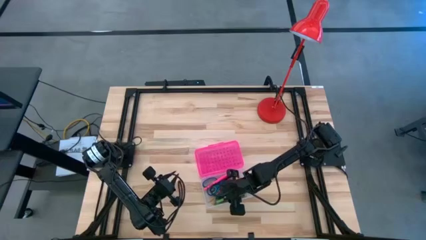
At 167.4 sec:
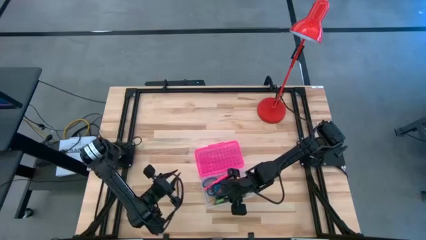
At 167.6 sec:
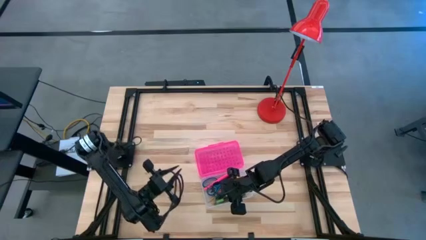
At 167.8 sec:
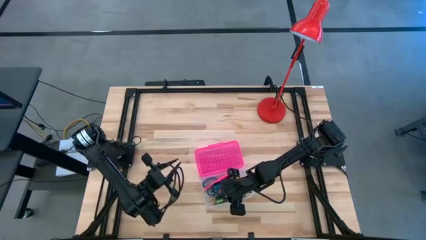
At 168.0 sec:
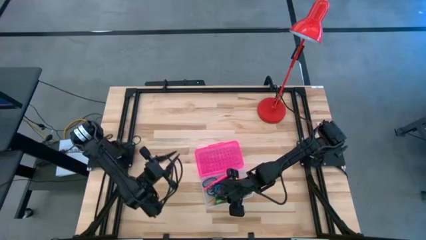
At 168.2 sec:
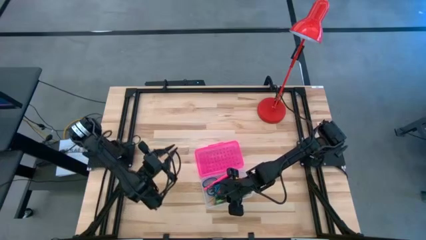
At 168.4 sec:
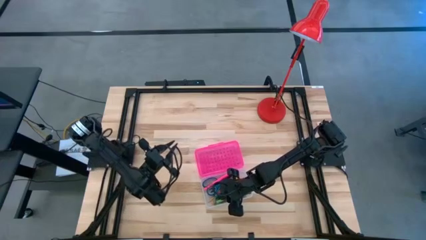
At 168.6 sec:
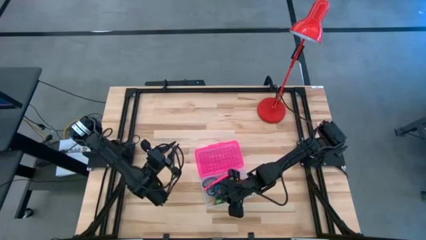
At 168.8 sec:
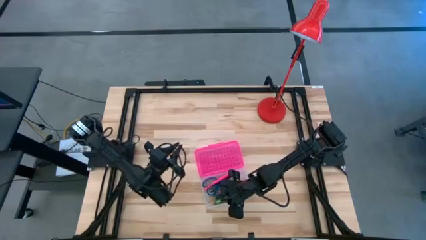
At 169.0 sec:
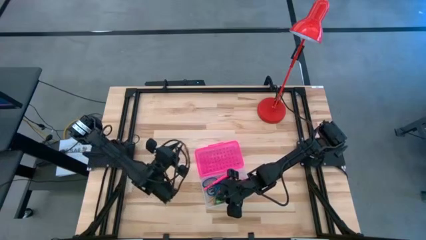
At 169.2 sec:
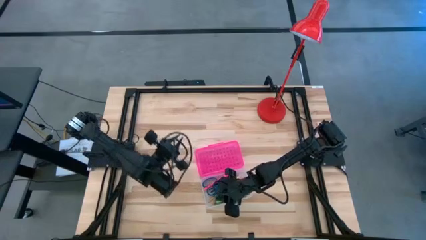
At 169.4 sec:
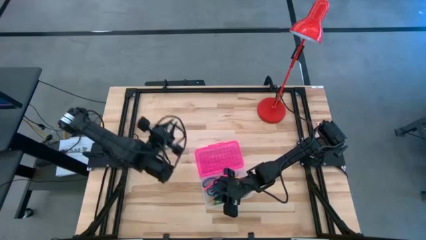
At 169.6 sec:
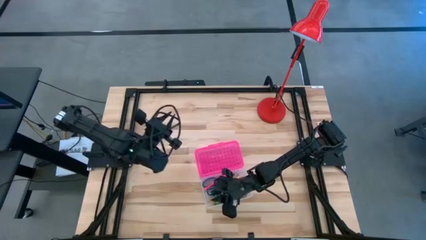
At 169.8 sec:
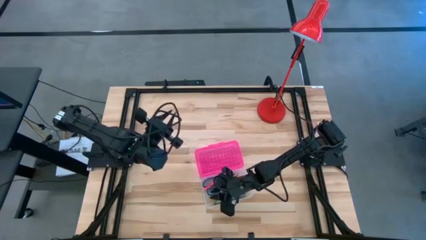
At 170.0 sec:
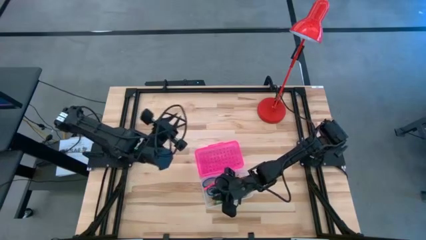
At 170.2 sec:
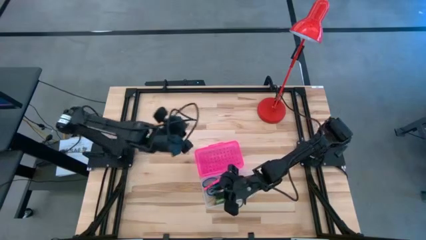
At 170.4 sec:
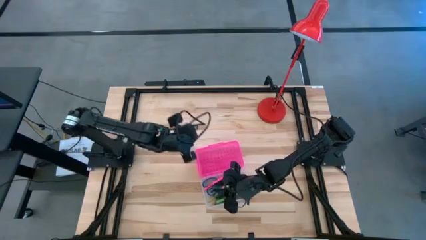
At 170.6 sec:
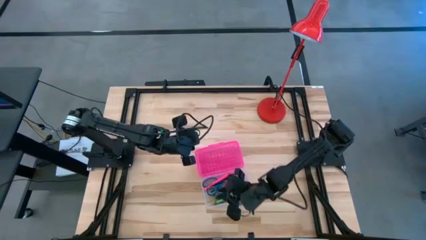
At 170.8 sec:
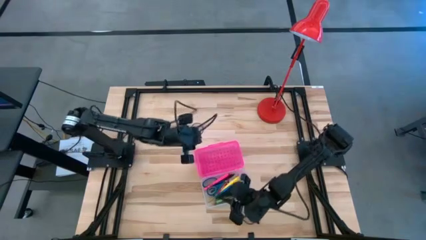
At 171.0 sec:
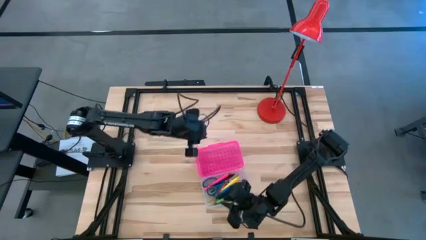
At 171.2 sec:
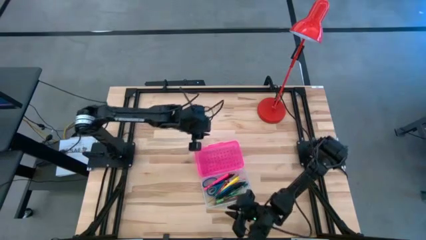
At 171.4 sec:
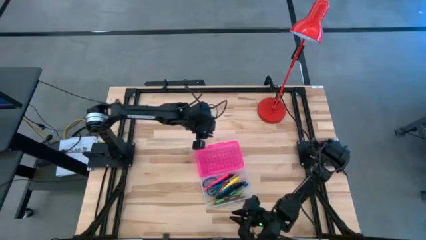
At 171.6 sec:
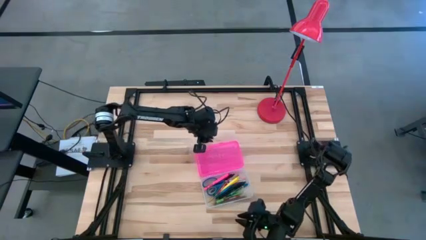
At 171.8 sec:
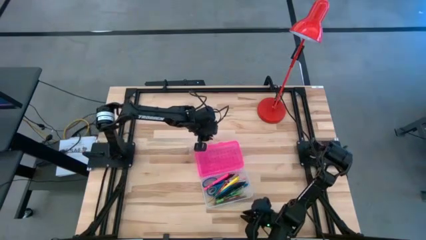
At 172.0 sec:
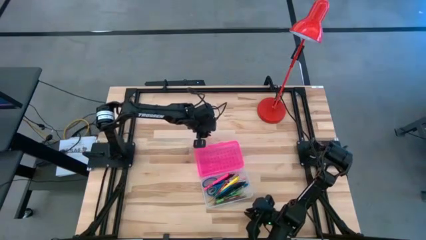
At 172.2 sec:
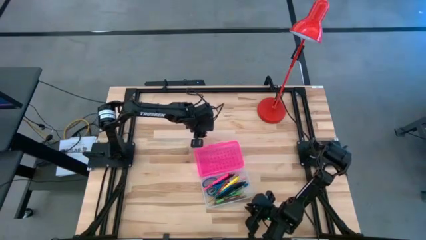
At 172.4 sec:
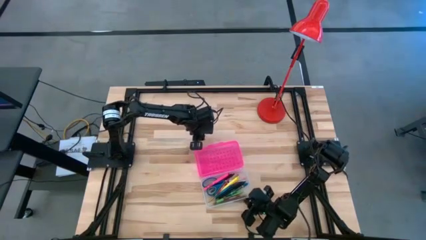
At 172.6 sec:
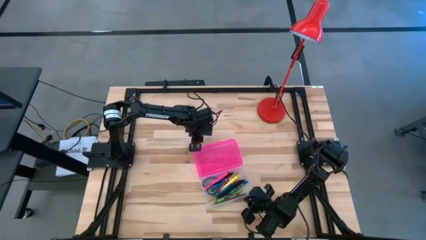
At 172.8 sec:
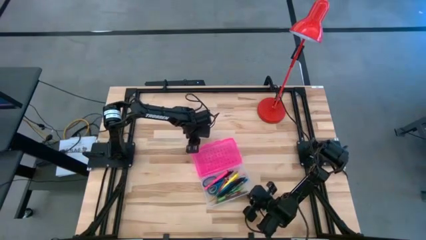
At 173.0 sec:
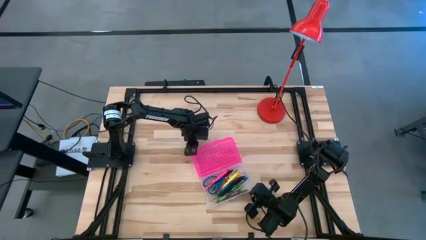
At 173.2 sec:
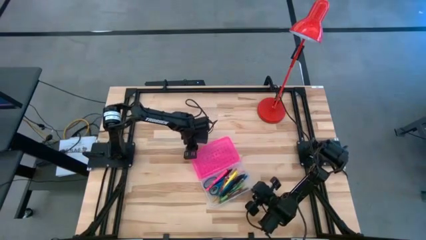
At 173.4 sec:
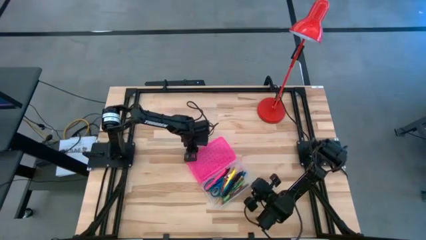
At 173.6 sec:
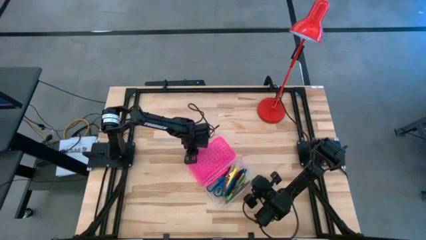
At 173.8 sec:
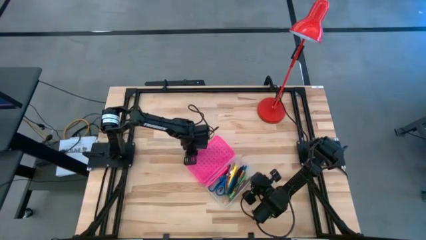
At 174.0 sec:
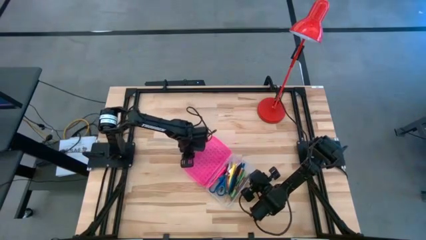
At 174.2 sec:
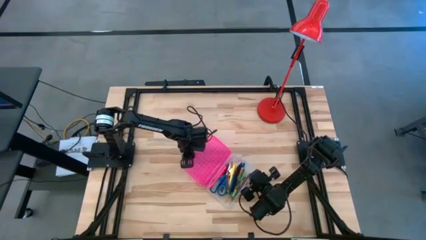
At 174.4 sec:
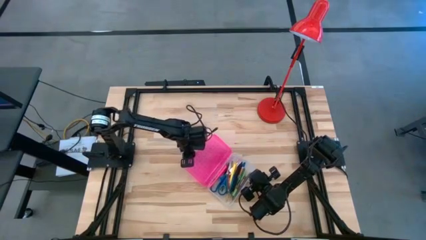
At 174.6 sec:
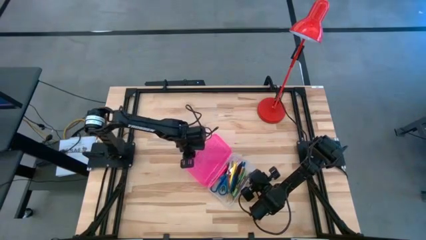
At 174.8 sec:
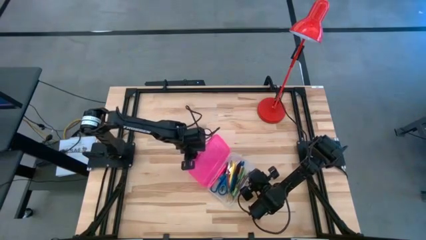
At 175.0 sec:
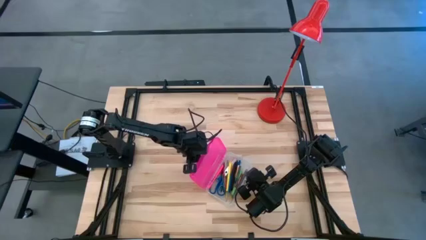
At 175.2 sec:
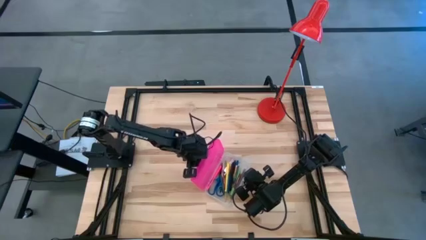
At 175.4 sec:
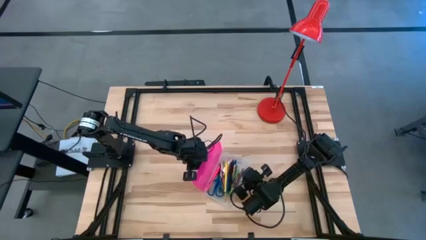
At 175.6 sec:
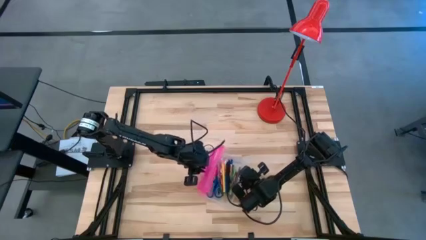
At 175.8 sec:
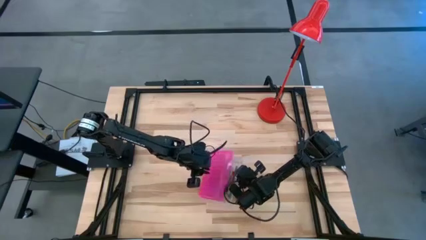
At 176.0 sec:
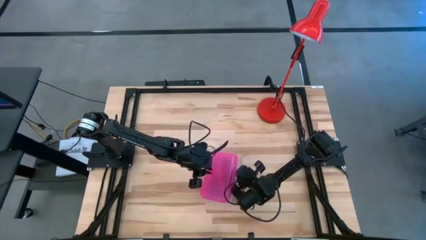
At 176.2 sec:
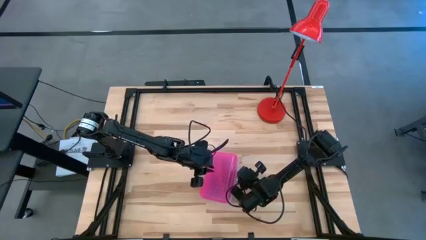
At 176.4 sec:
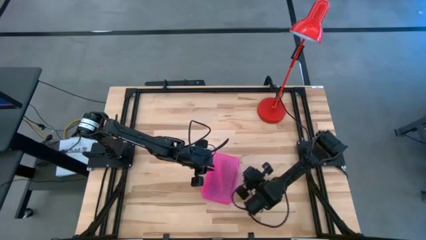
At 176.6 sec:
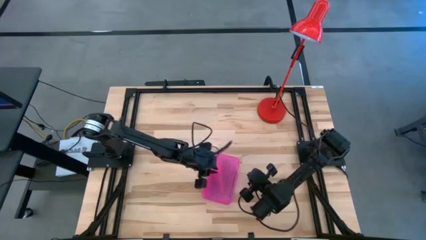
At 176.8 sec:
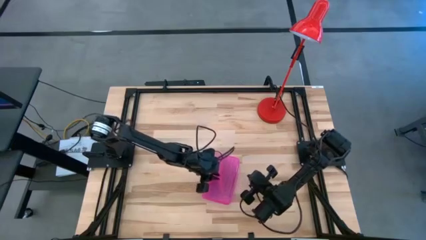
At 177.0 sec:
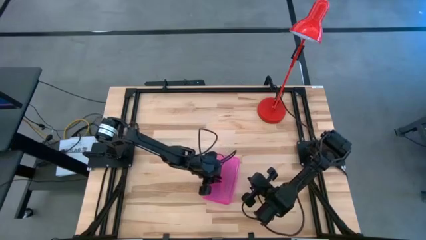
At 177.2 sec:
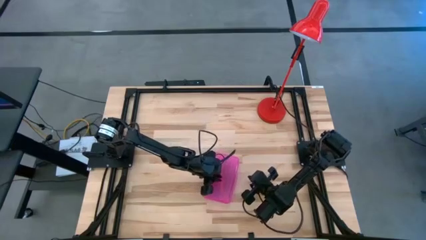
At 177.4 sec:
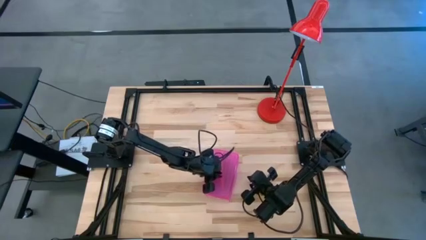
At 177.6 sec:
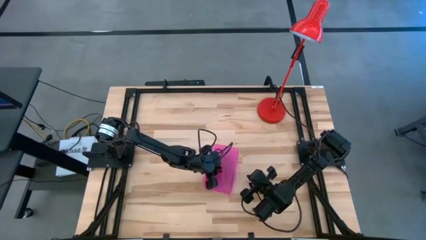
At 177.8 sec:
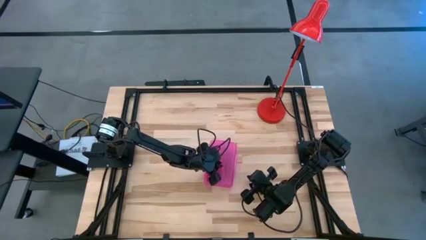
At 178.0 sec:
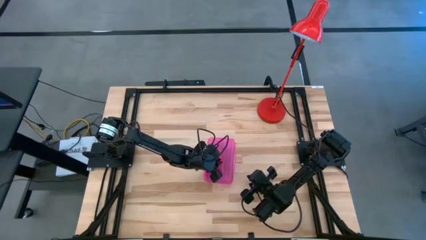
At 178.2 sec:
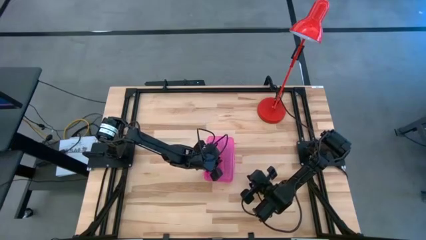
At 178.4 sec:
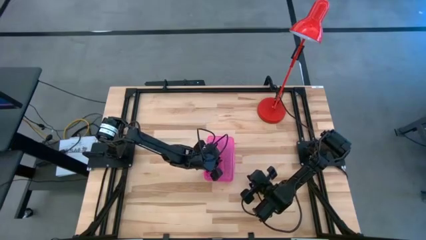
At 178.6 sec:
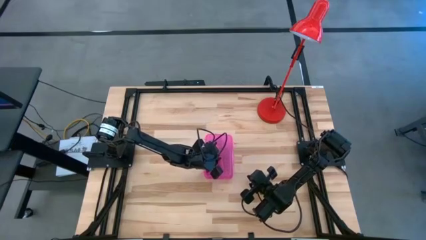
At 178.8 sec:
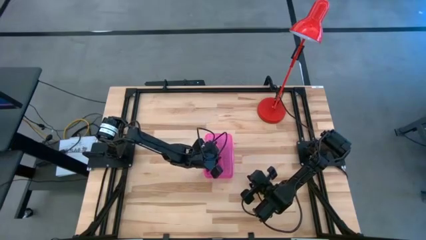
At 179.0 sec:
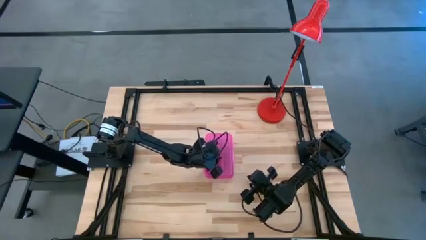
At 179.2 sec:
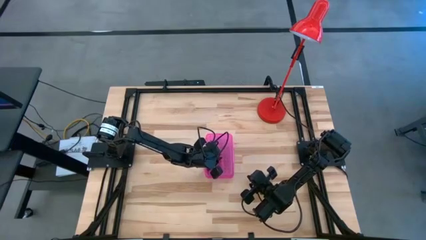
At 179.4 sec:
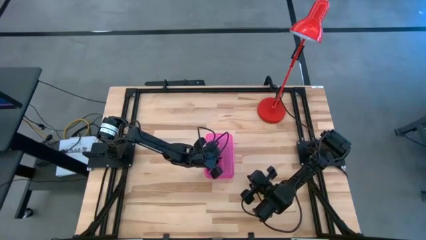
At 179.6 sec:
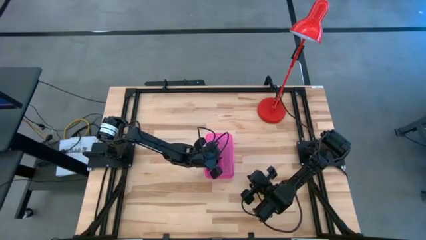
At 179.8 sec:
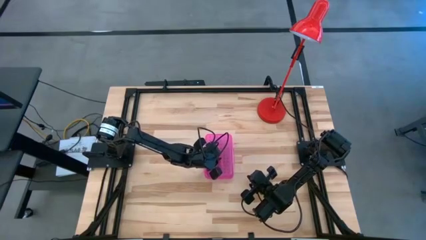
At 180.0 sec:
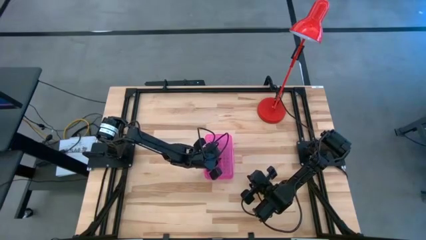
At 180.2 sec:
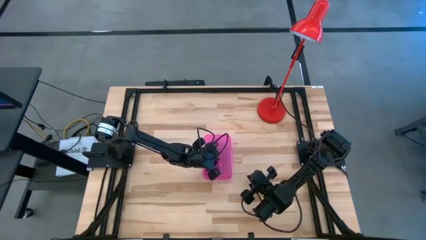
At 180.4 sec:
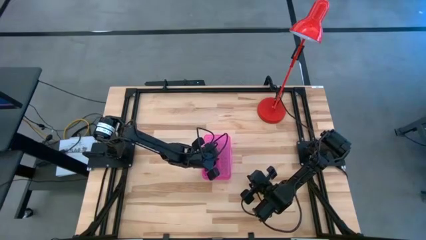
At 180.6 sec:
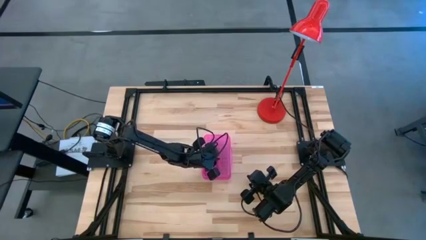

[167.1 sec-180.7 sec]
Task: Pick & place school supplies into a supply box
Close the pink supply box

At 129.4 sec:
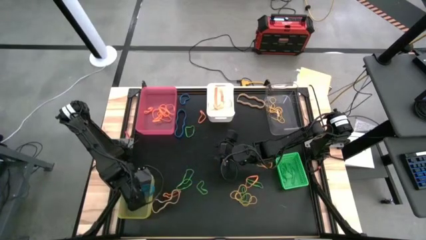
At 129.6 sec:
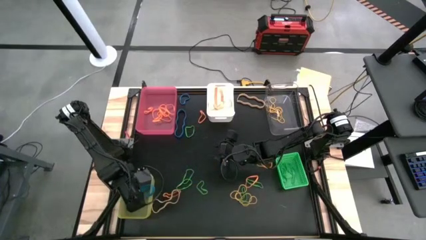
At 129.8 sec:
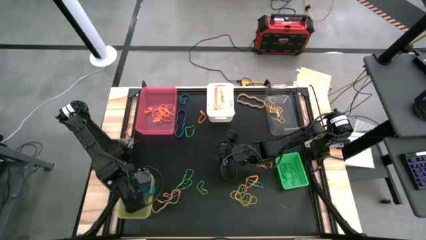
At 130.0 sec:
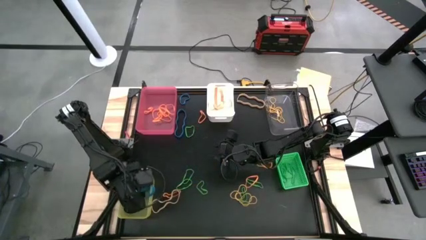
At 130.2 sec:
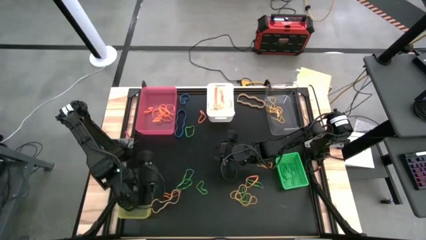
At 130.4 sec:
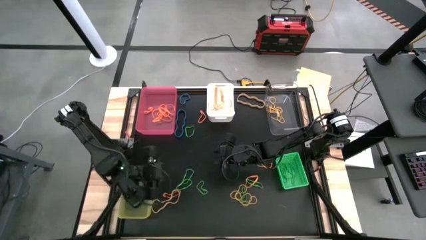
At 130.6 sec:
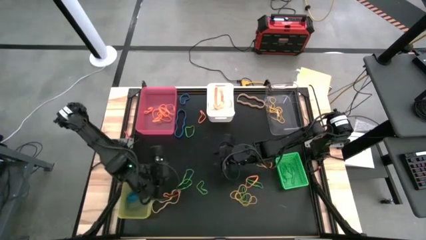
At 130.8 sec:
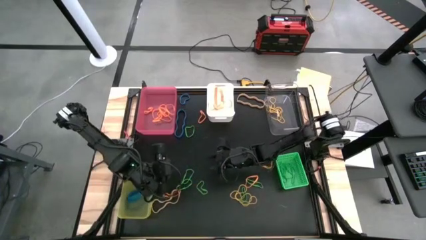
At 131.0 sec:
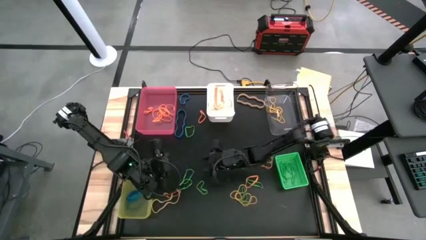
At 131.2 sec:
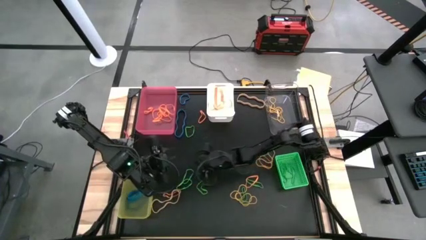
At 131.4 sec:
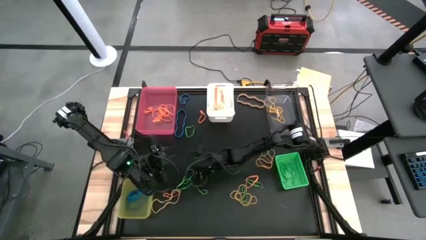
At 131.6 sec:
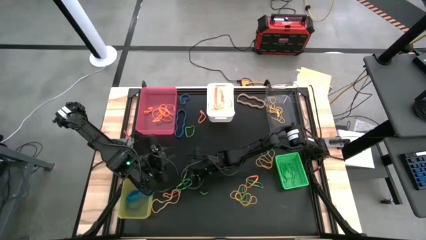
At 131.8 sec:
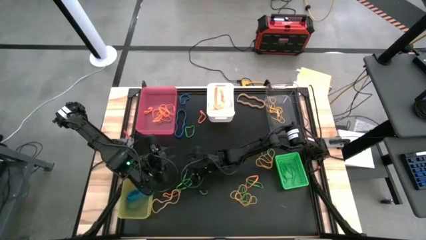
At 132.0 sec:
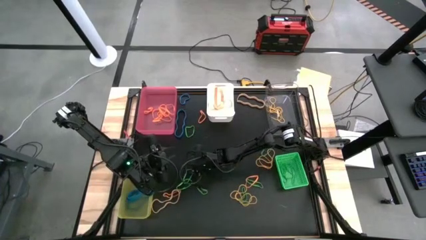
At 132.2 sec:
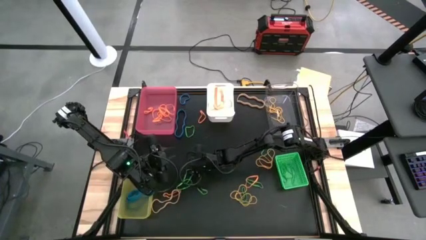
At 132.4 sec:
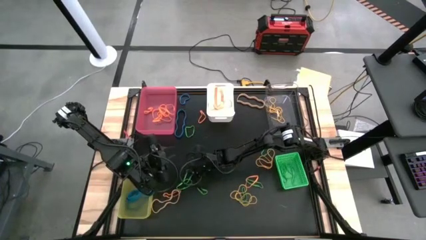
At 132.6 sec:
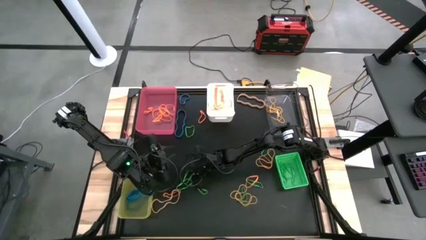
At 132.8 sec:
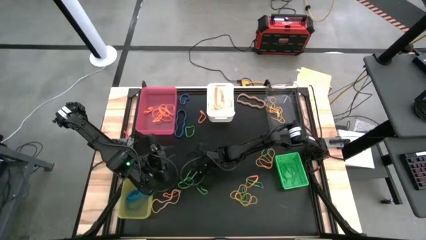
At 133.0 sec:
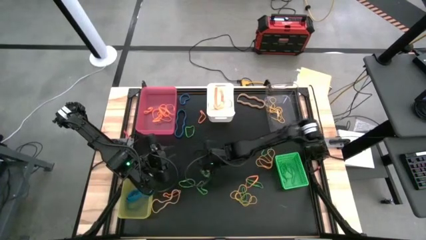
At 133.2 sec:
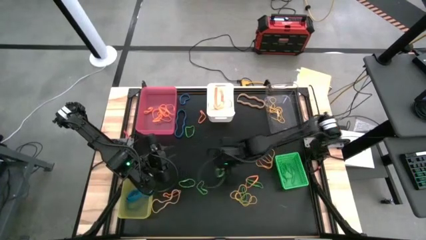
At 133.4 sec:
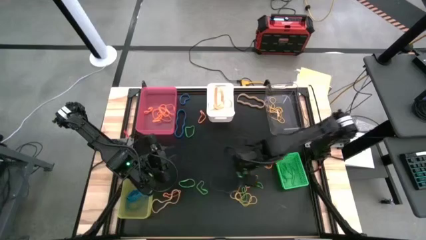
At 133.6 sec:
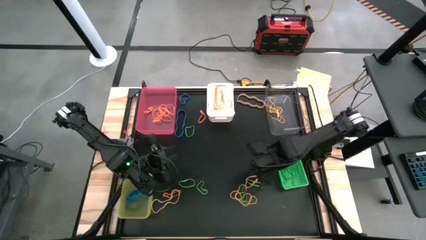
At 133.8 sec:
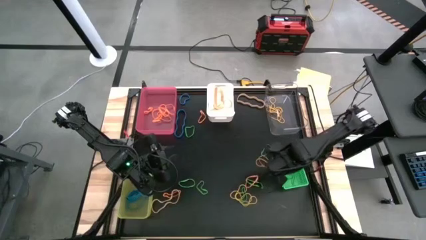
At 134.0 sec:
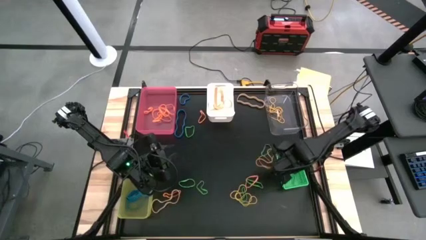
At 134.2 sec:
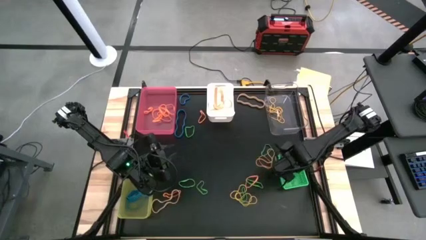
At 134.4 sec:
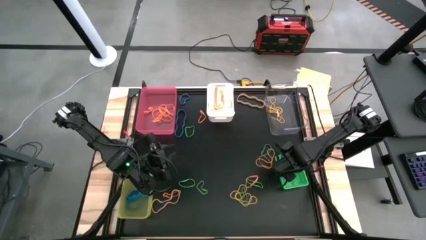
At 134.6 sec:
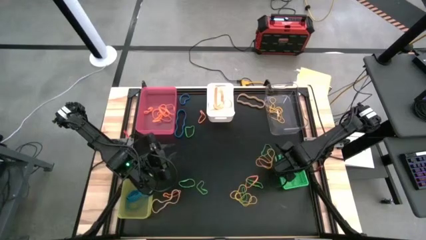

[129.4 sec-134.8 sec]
Task: Sort rubber bands into baskets
Put the green rubber band into the green bin
